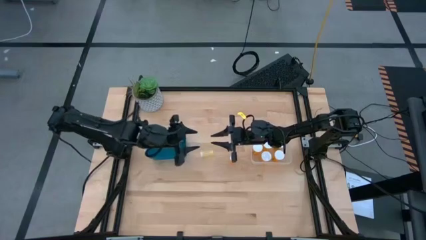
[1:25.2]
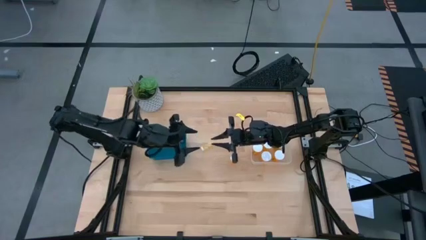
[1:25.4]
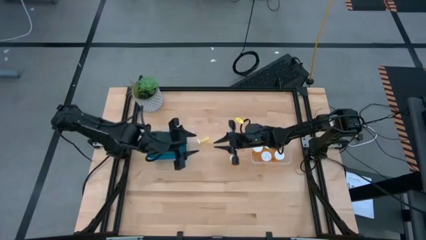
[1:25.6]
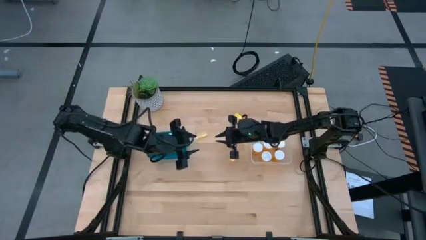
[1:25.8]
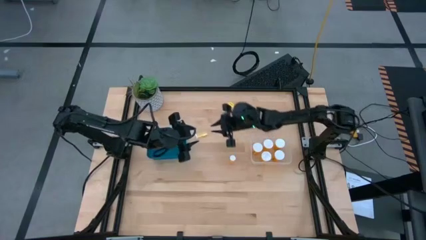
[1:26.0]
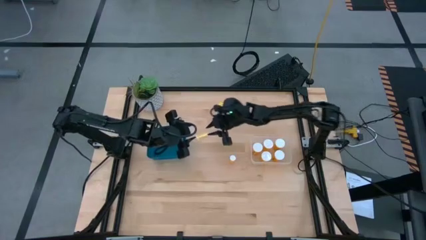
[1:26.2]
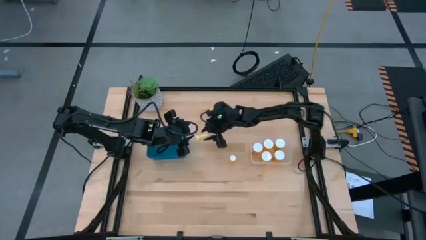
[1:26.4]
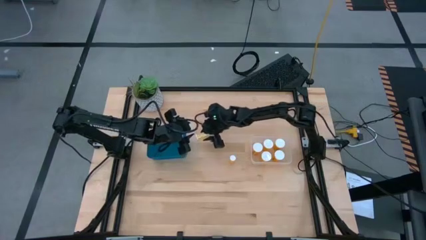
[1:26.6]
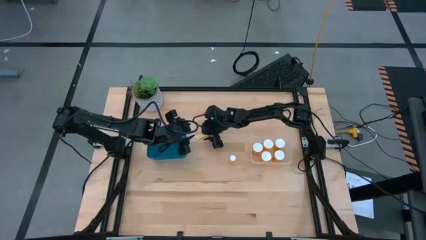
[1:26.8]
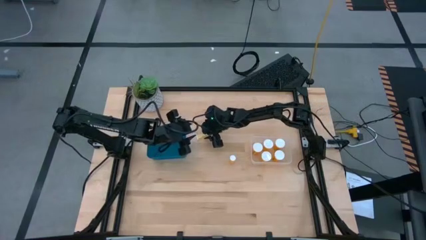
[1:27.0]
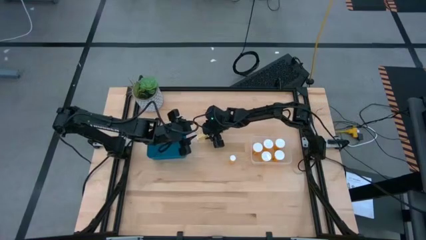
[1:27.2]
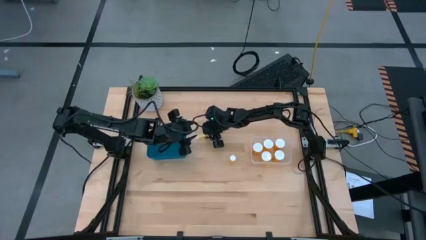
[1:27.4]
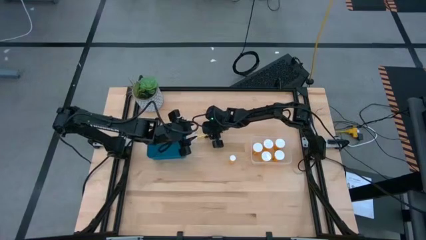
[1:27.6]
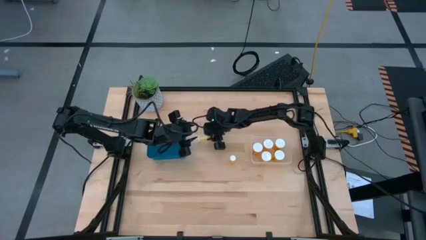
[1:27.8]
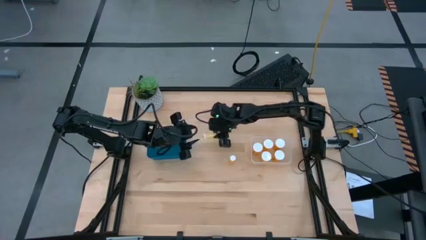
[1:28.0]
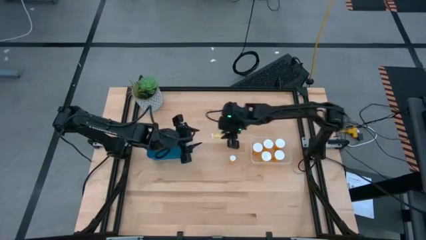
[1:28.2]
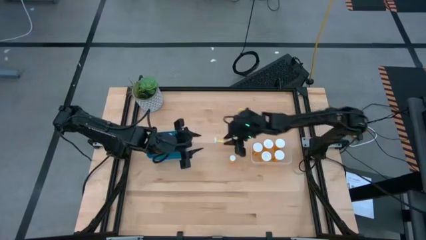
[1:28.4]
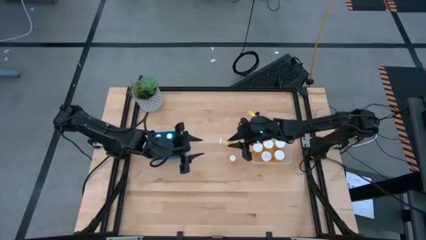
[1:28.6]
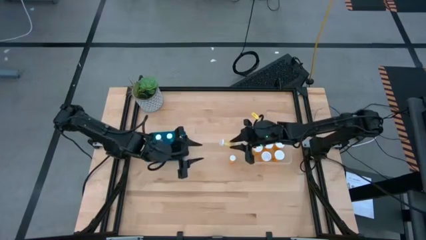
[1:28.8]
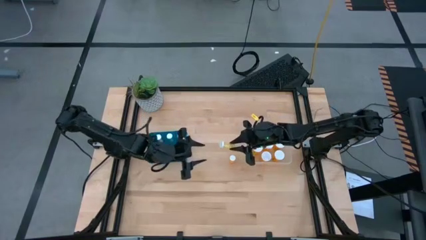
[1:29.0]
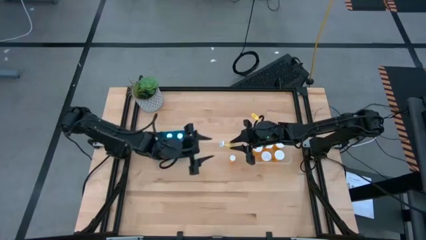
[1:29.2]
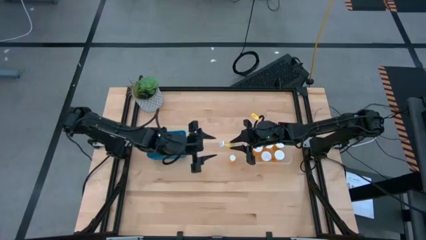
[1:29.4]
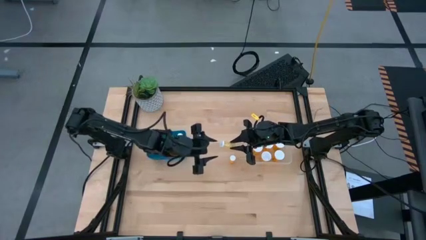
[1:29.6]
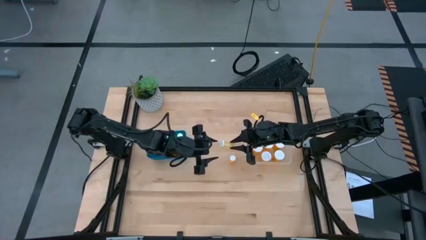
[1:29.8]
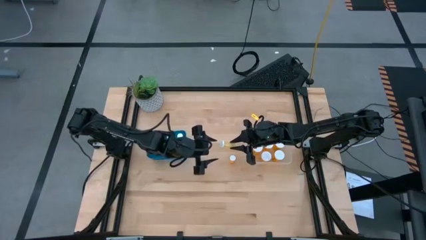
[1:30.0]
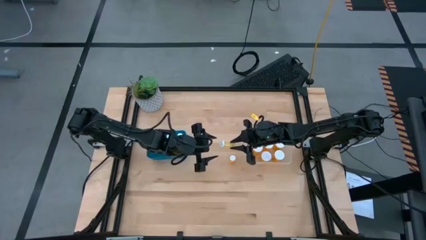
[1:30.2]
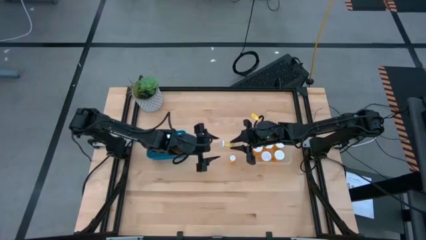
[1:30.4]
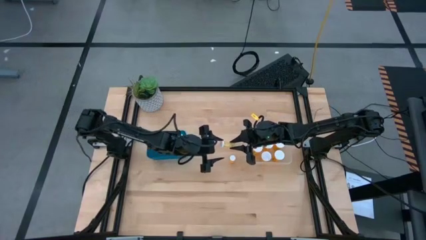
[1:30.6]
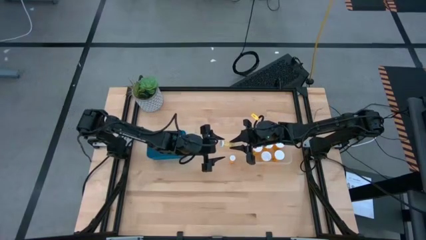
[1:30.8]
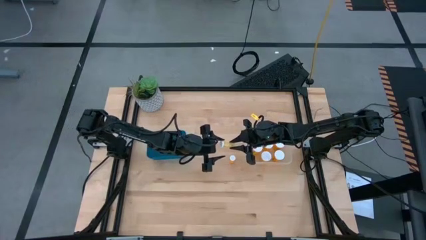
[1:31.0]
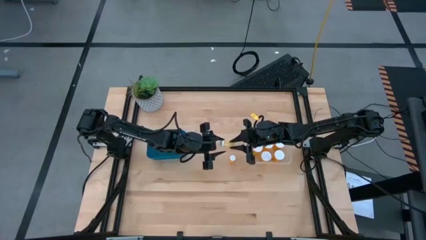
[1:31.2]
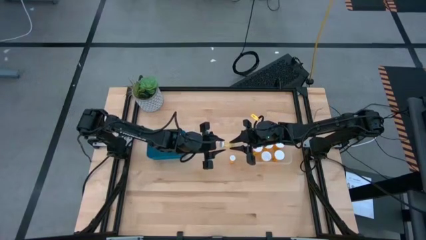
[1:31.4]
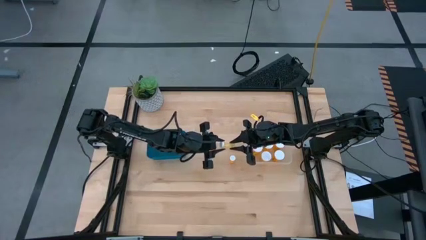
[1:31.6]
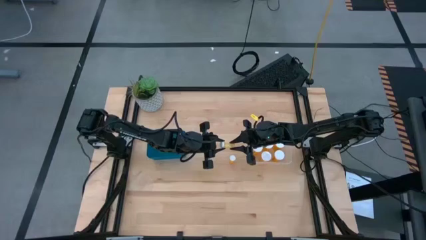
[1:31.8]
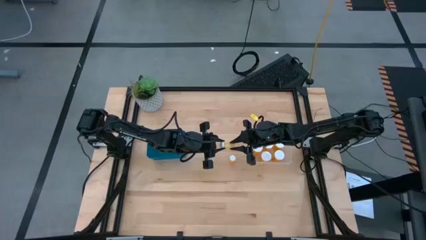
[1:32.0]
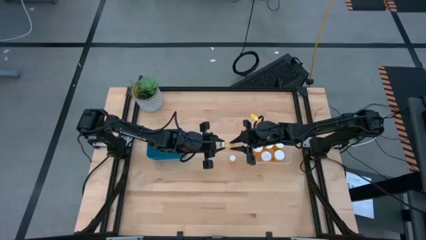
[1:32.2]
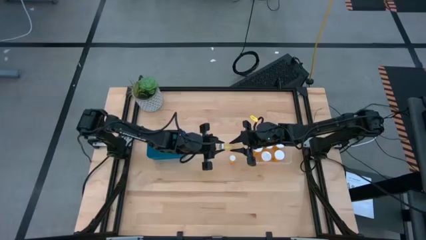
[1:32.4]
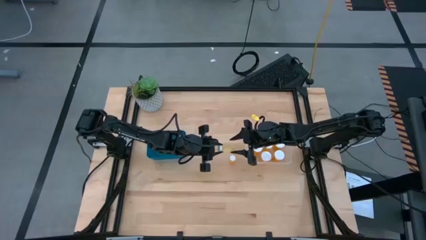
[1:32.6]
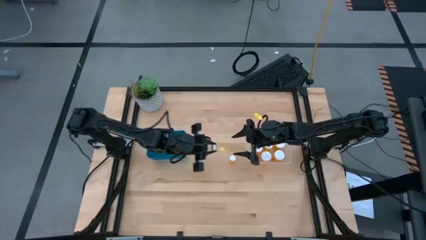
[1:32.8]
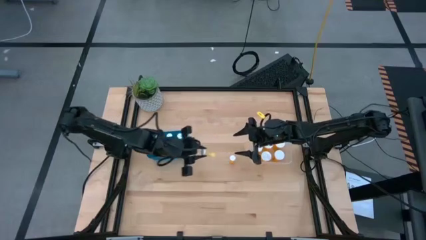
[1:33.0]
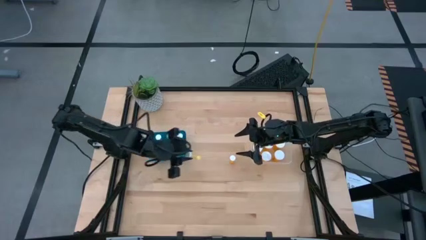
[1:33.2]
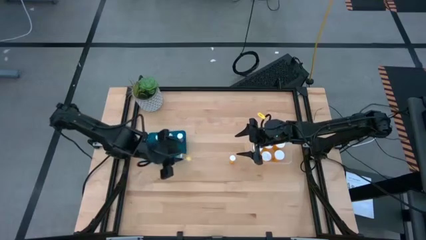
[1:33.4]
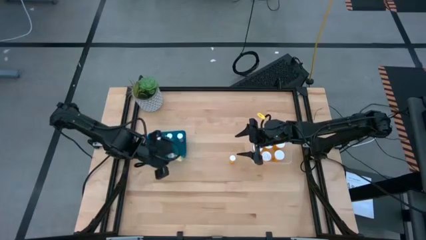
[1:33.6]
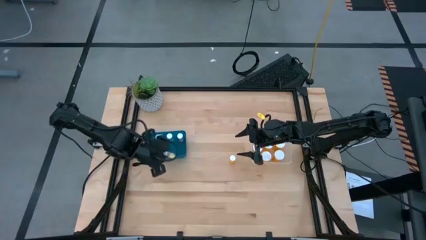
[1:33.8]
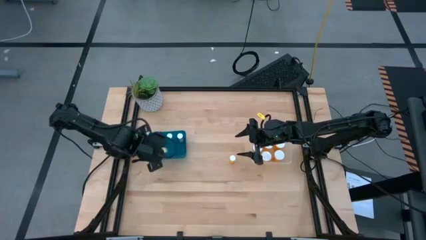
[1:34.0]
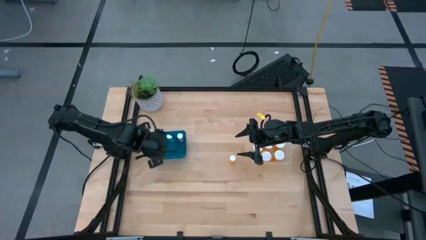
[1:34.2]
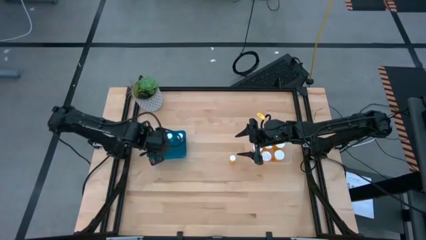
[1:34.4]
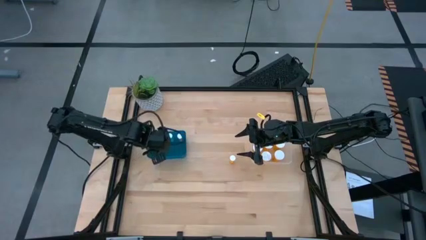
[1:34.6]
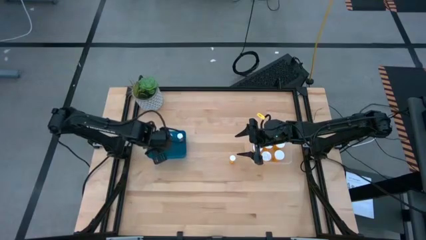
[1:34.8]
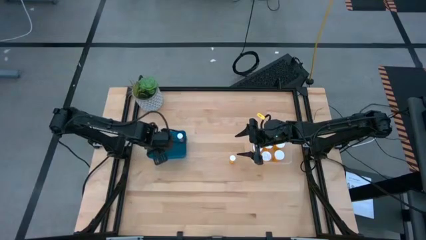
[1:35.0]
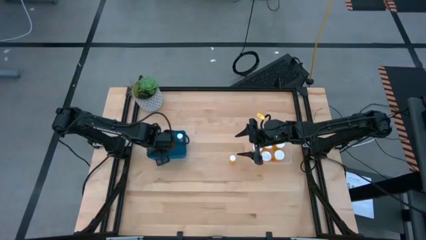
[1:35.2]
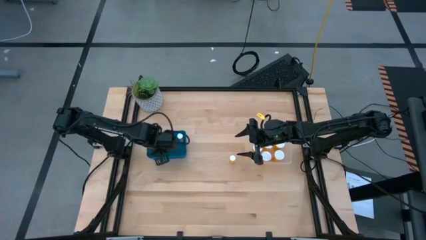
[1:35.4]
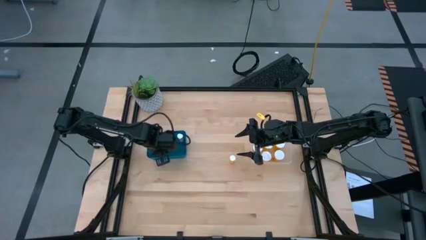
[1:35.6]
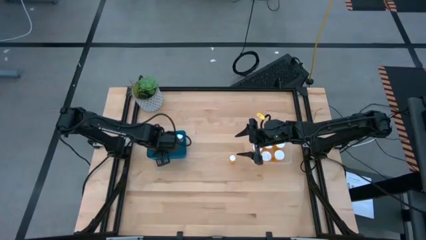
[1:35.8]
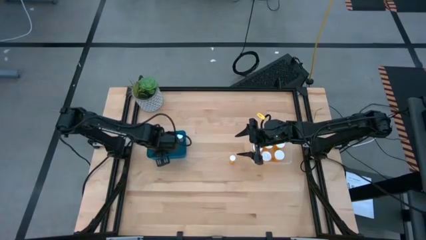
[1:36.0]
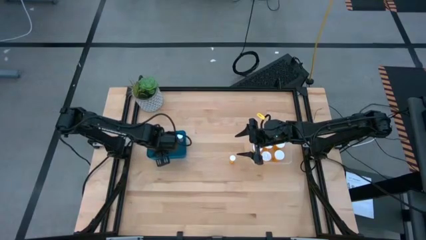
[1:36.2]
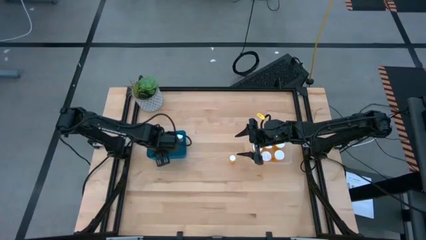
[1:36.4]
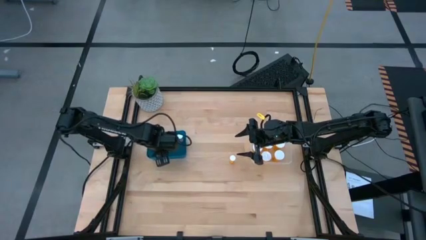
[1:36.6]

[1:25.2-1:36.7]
Task: Pick and place medicine bottles into bin by pill shape (circle, oval)
Put the small yellow pill bottle into the blue bin

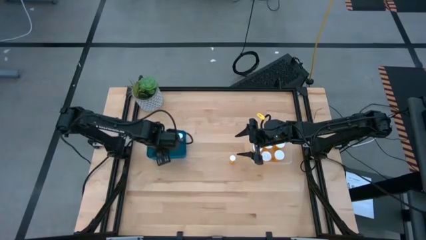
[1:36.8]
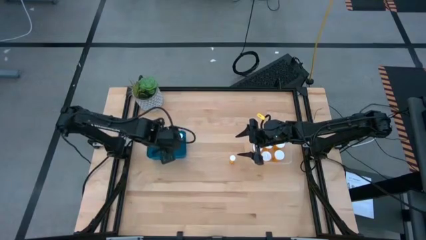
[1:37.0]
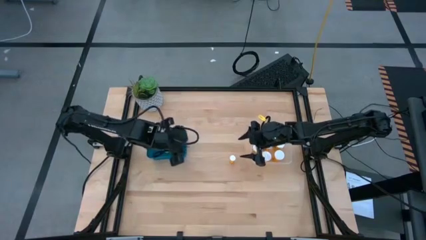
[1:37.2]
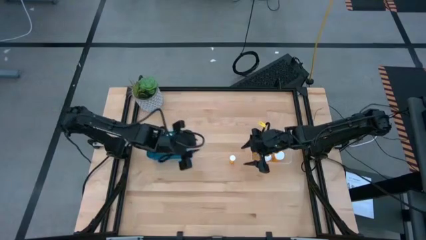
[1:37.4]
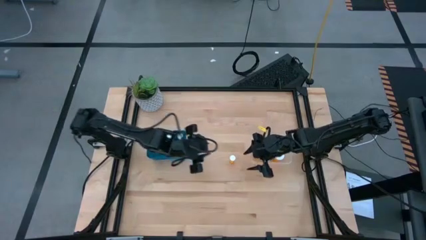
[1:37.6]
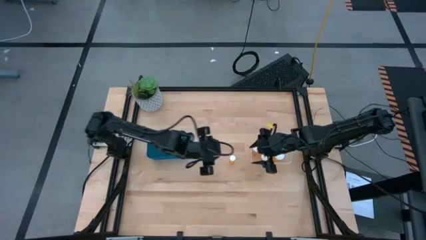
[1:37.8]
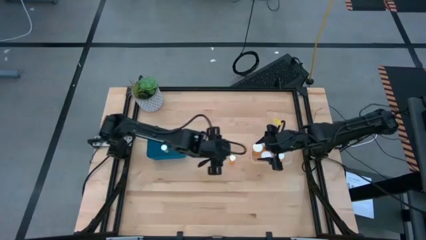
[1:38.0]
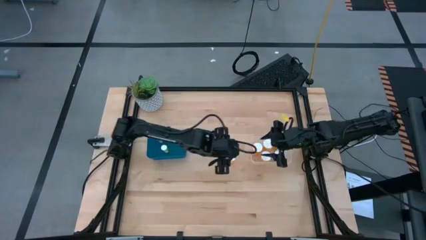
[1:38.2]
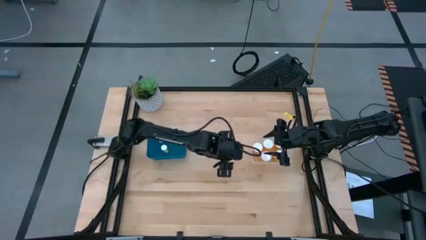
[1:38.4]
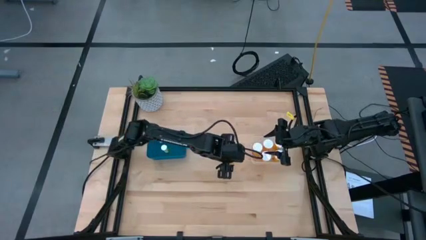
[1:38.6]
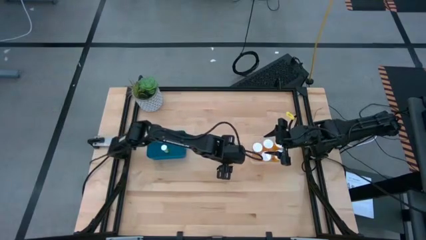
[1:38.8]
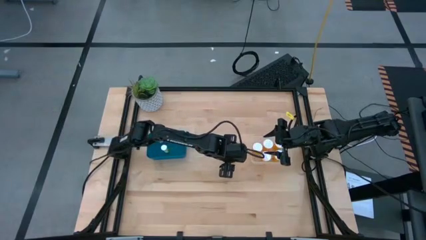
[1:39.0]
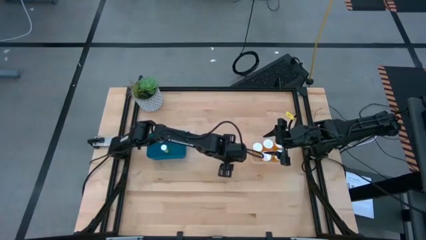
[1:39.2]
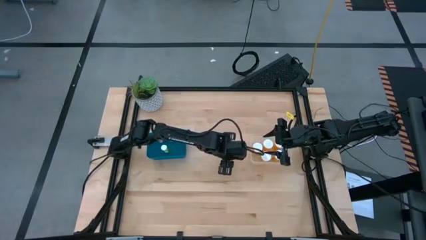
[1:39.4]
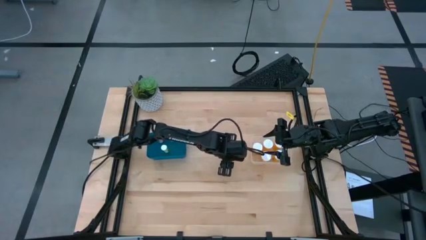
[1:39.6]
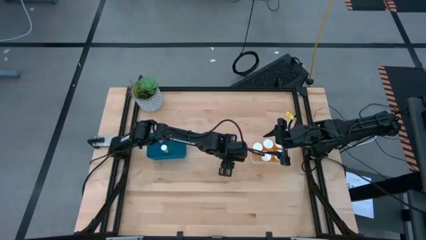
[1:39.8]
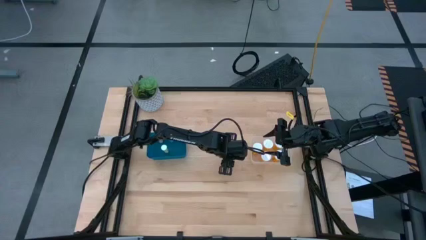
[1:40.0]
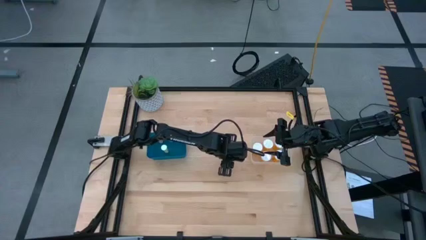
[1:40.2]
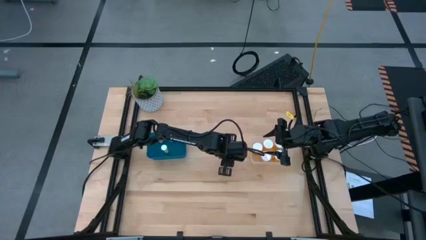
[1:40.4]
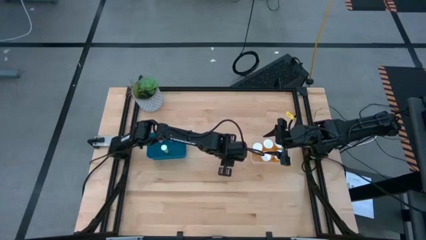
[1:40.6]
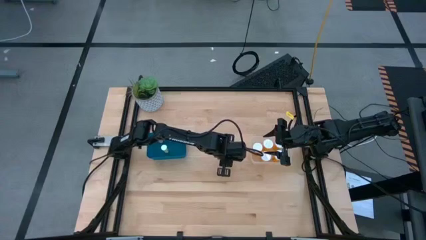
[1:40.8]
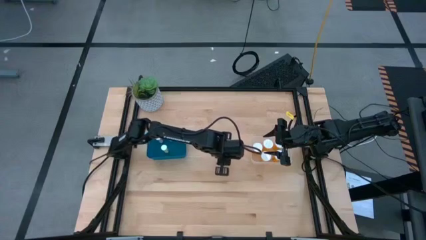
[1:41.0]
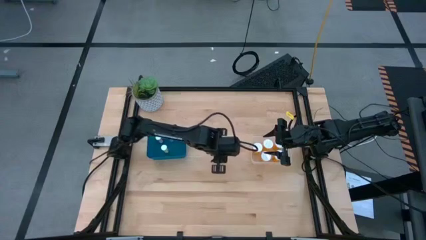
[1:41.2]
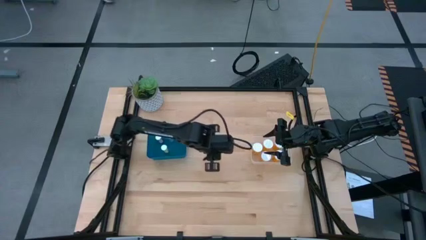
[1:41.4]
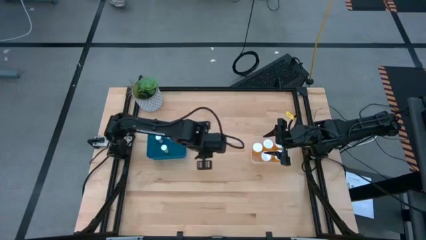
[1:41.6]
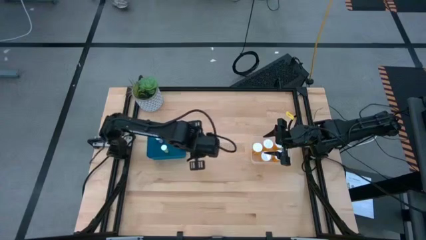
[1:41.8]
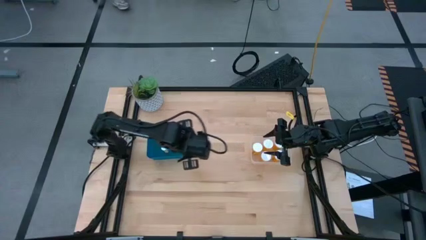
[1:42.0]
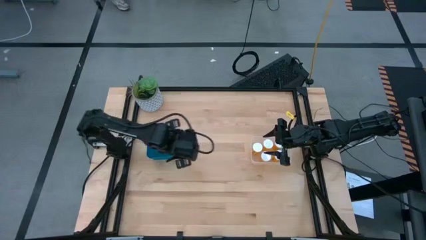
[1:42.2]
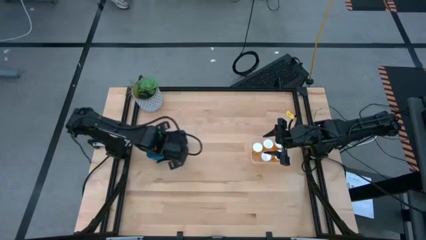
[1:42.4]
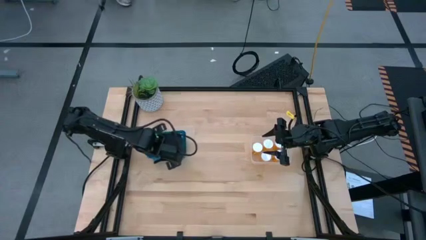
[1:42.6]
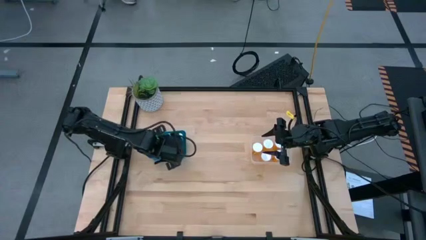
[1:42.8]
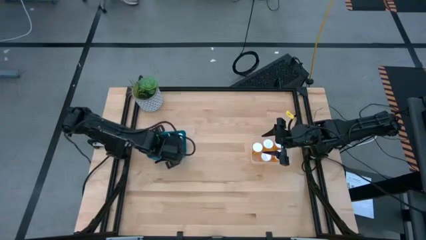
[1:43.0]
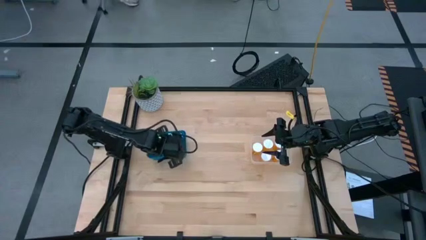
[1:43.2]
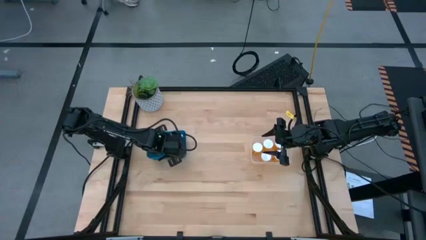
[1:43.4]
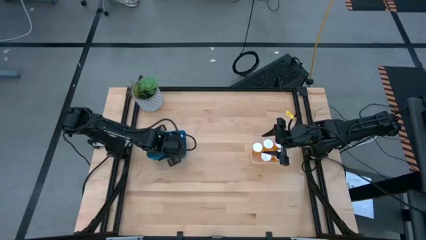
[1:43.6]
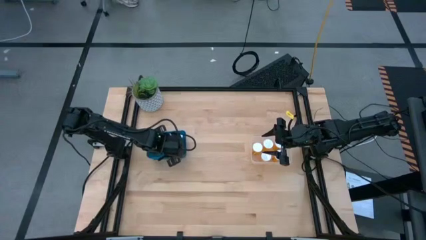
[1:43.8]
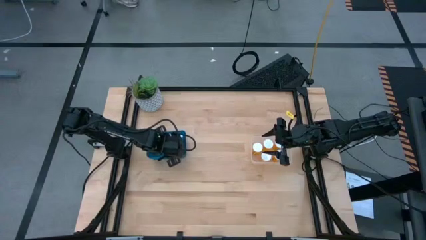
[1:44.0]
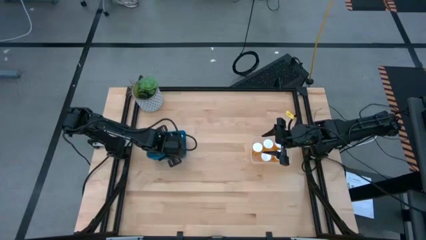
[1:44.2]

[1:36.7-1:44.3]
Put the small orange pill bottle into the blue bin
